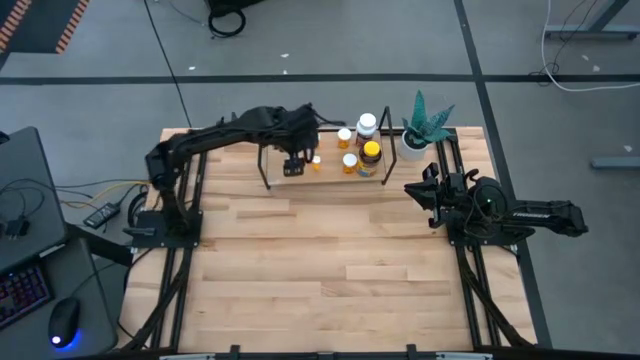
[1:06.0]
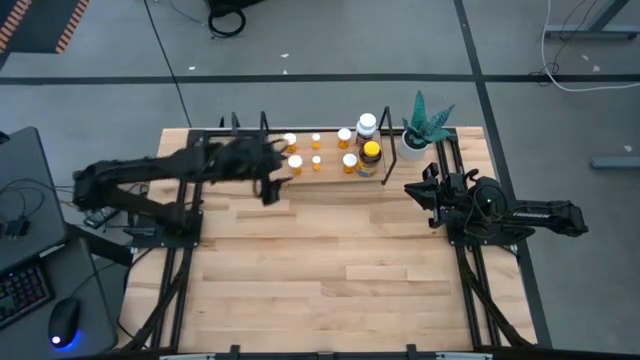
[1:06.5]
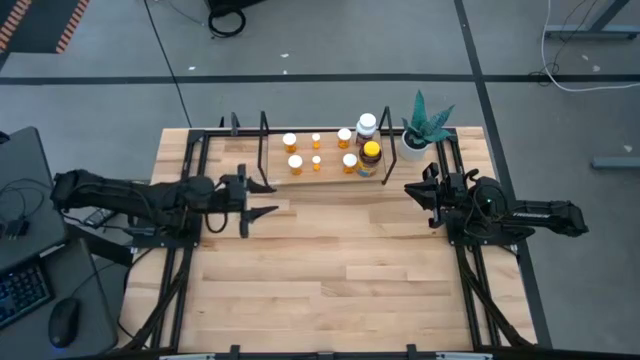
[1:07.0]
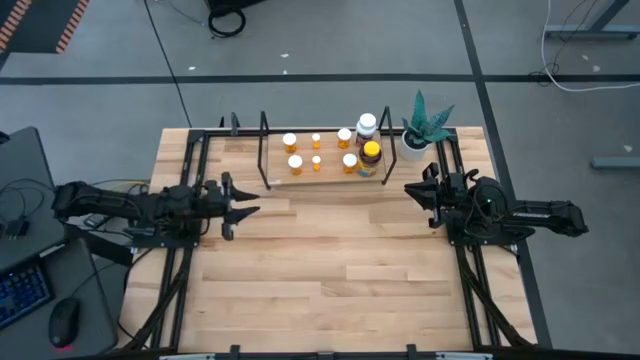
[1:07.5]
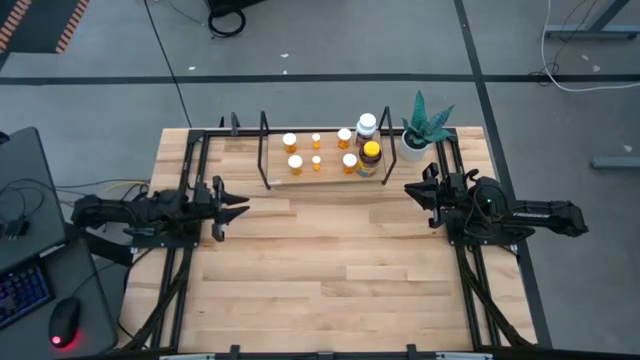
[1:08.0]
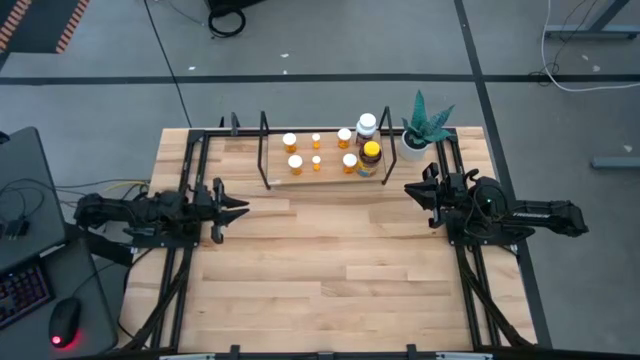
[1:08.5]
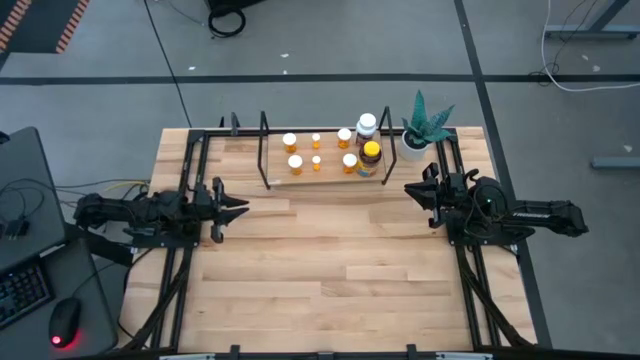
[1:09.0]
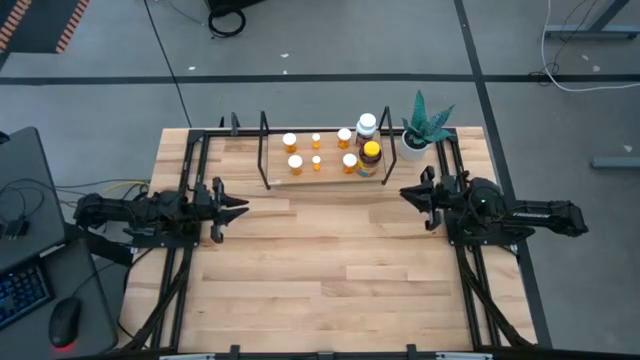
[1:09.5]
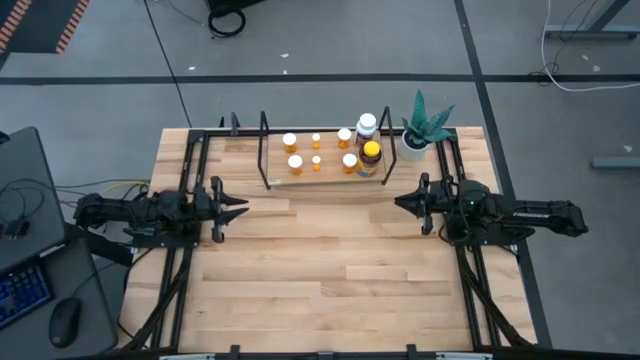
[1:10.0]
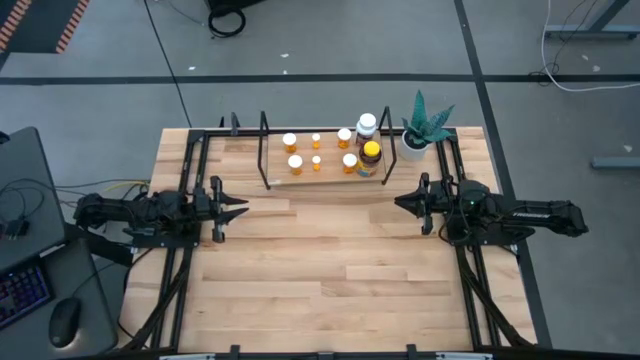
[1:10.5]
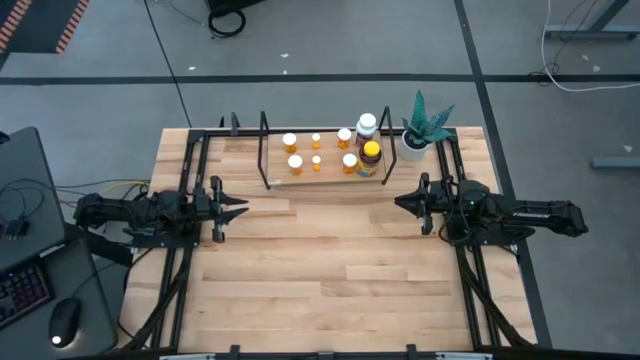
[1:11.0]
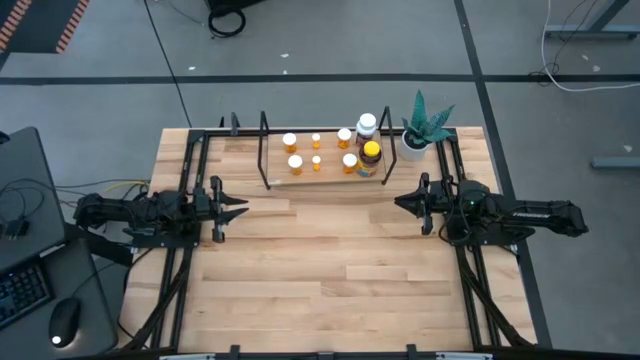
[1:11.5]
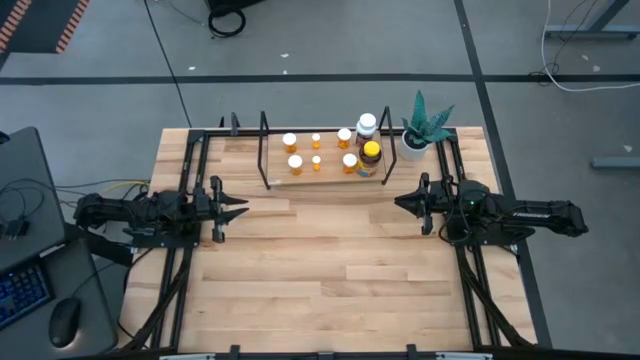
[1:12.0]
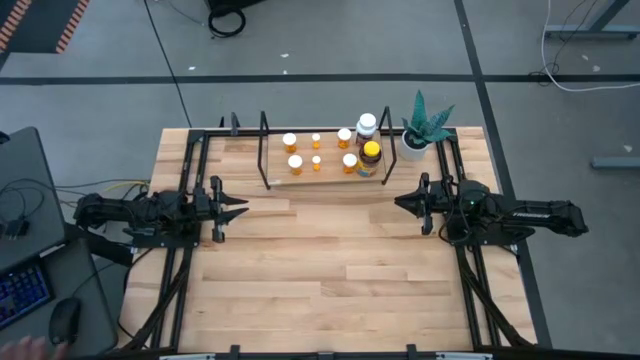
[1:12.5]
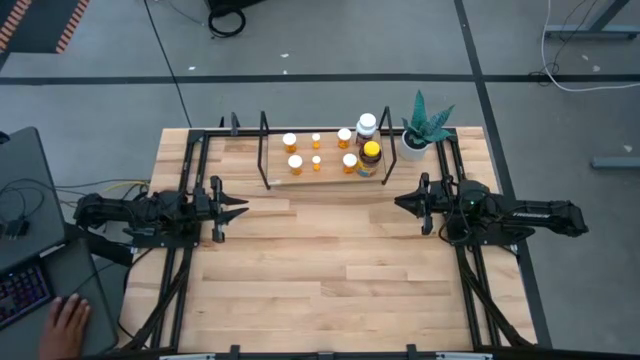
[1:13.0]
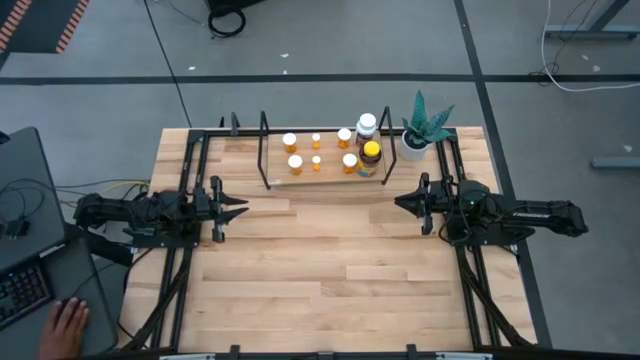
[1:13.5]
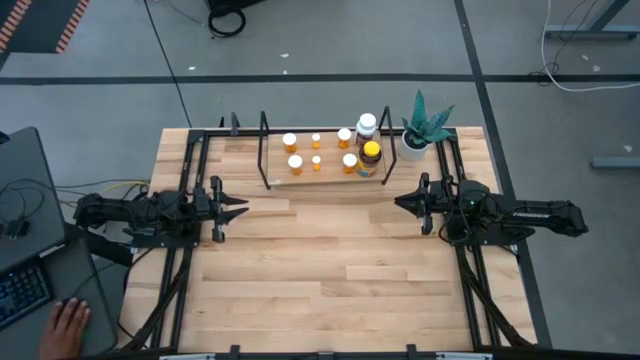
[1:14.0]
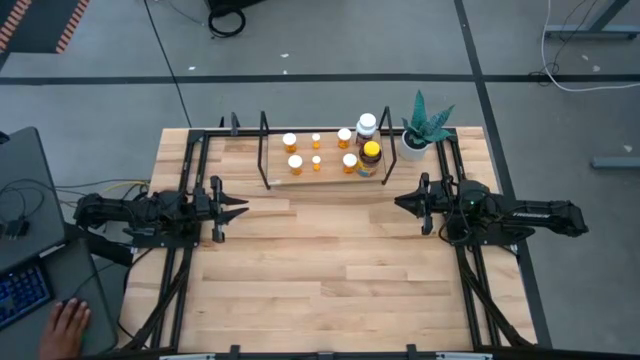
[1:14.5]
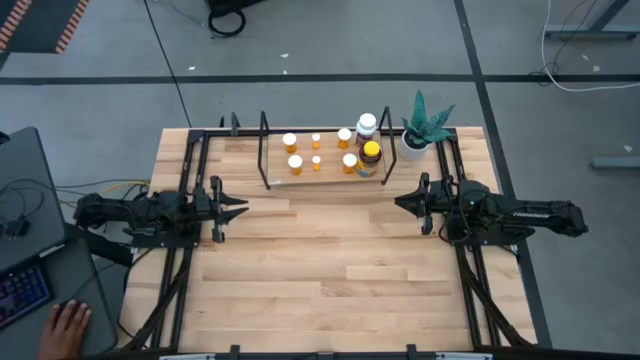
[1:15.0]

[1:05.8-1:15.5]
Task: Pick and place medicine bottles onto shelf by color
Return to Home Position

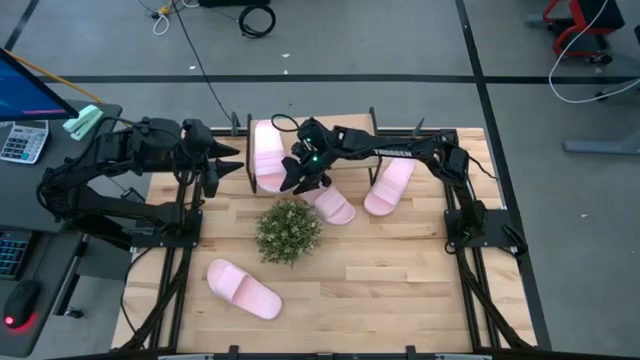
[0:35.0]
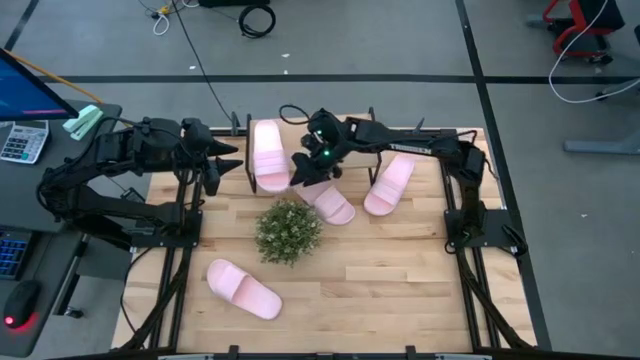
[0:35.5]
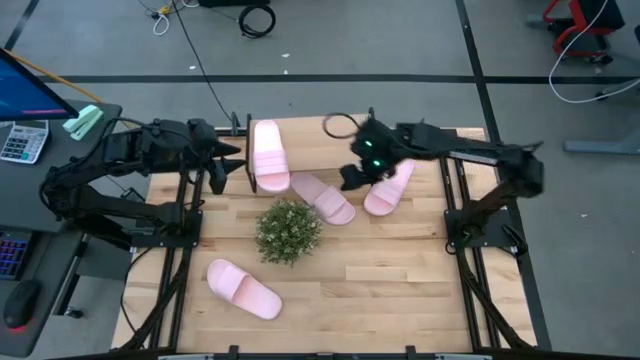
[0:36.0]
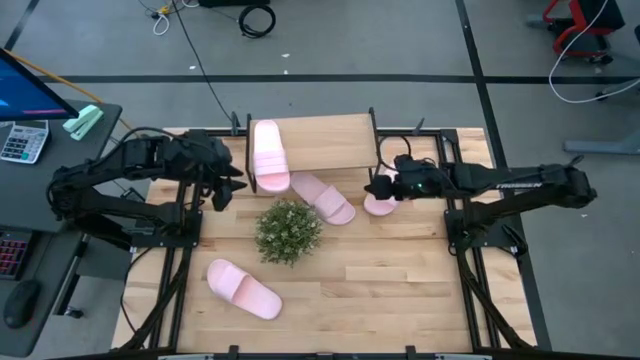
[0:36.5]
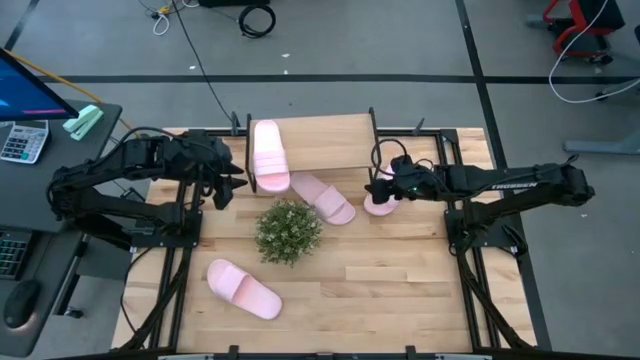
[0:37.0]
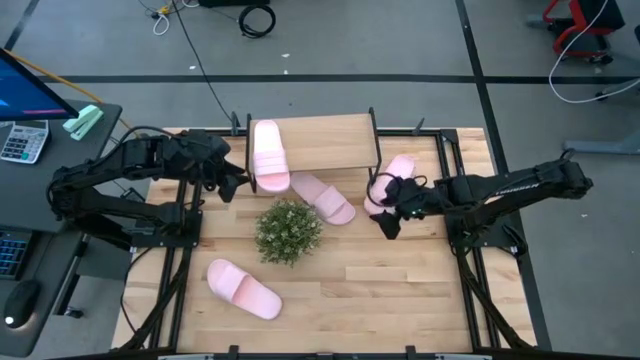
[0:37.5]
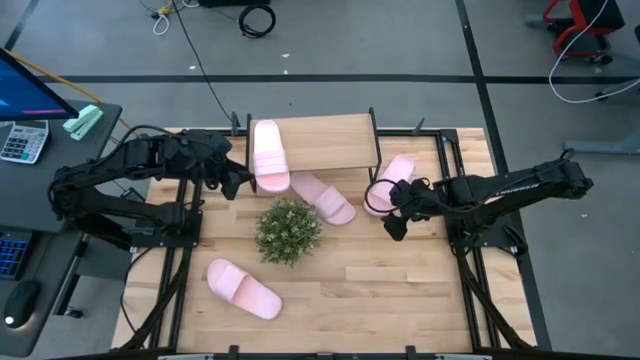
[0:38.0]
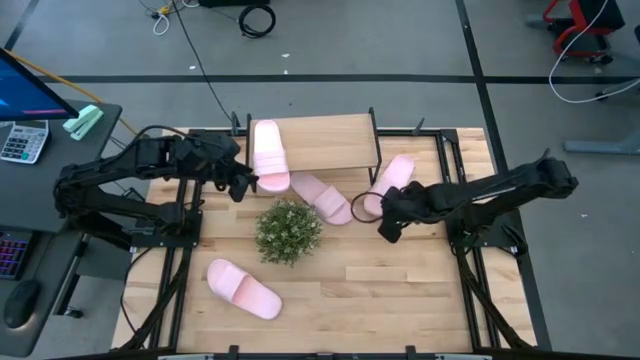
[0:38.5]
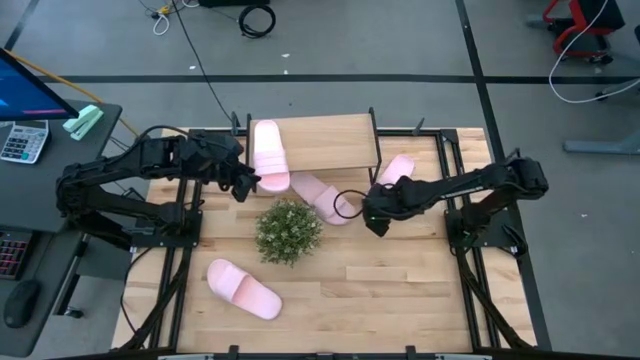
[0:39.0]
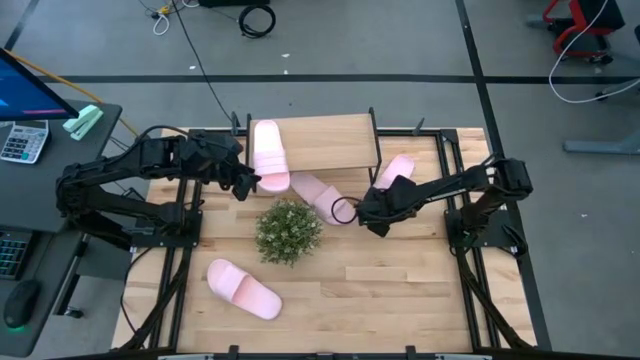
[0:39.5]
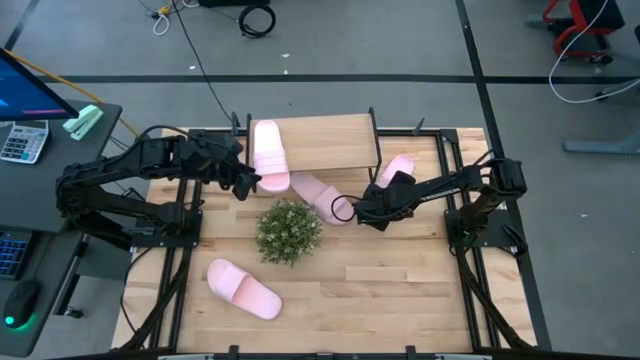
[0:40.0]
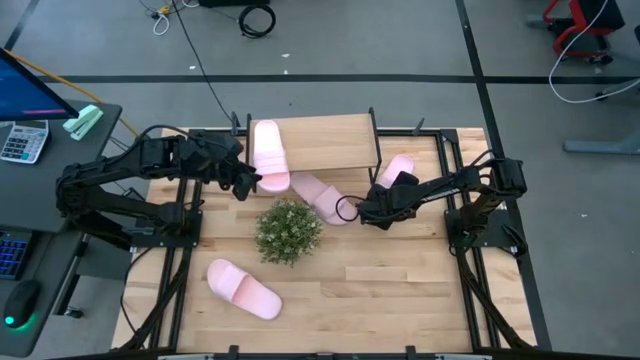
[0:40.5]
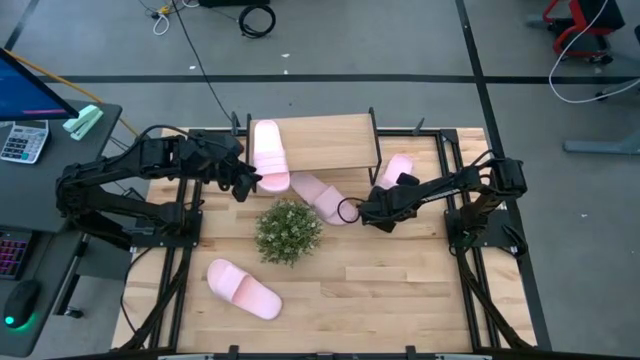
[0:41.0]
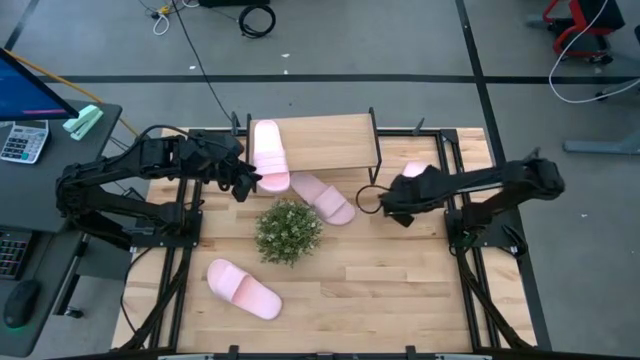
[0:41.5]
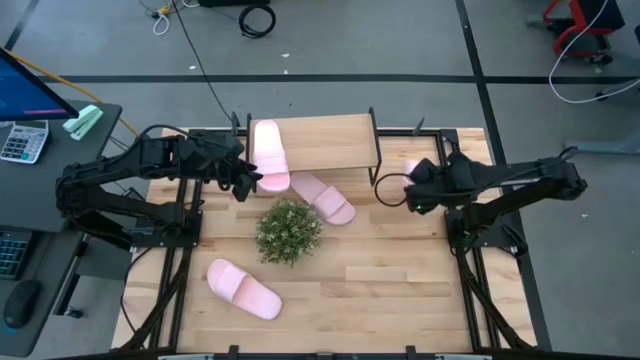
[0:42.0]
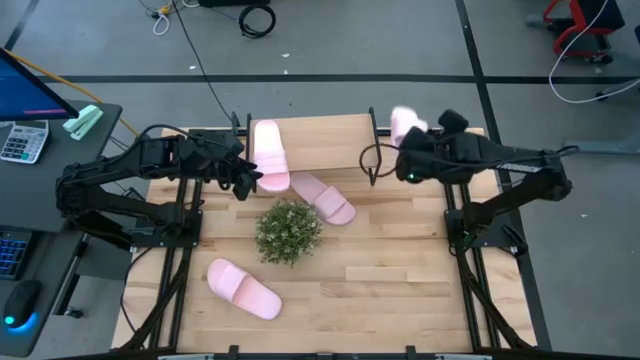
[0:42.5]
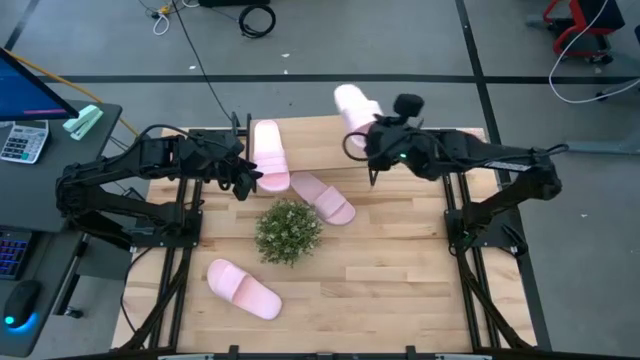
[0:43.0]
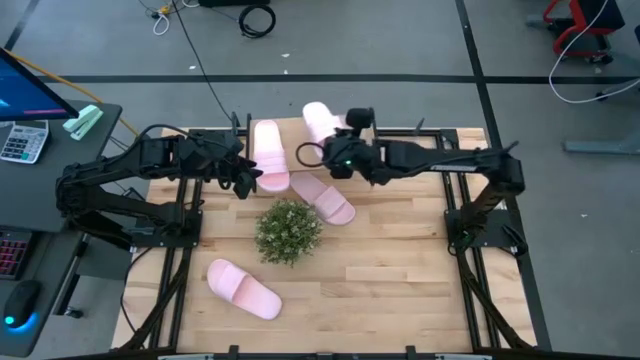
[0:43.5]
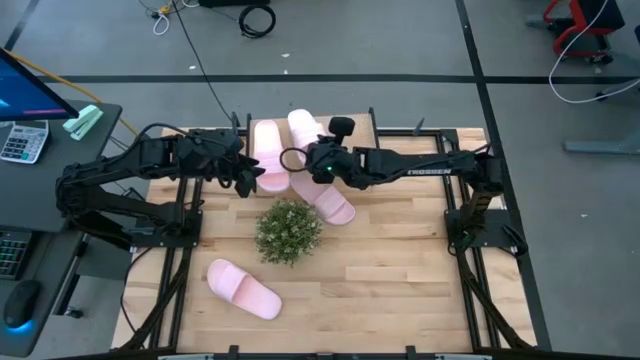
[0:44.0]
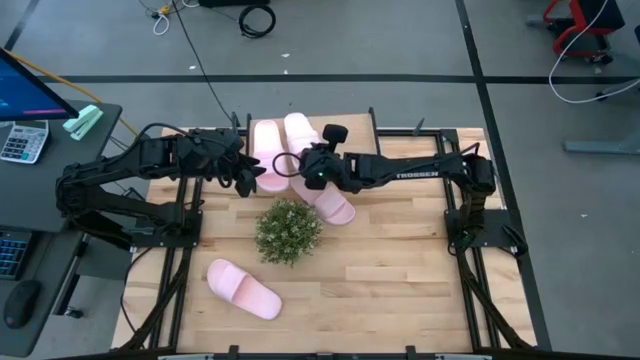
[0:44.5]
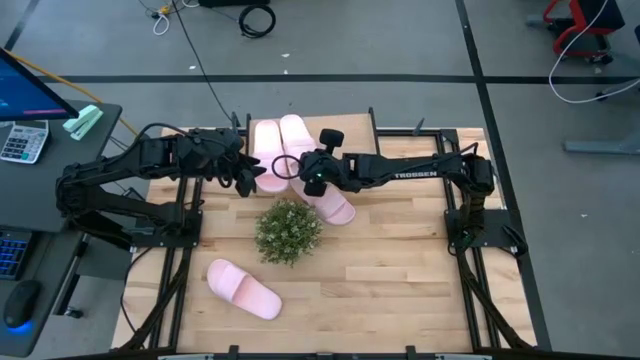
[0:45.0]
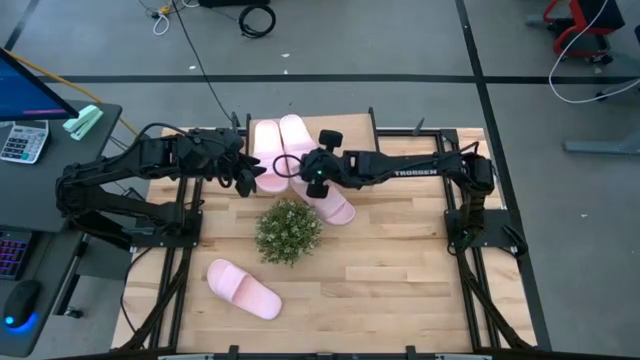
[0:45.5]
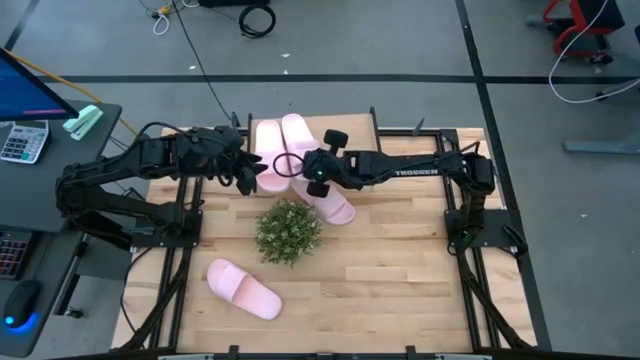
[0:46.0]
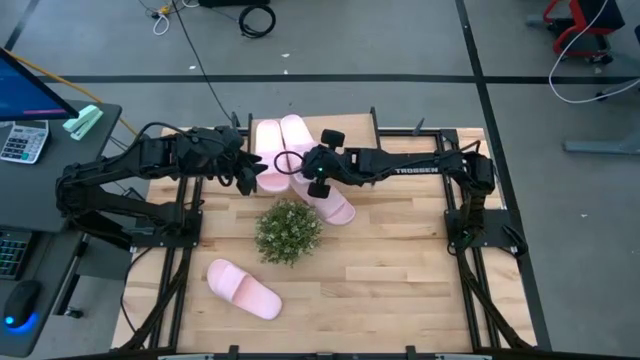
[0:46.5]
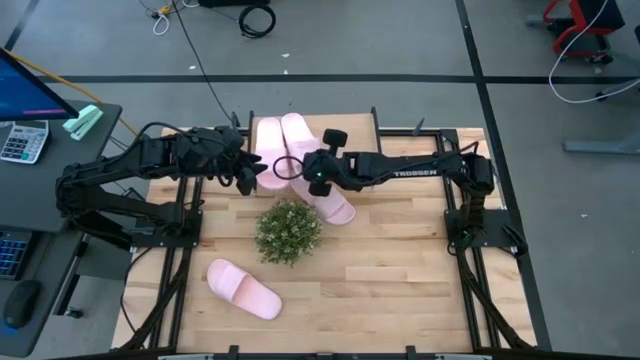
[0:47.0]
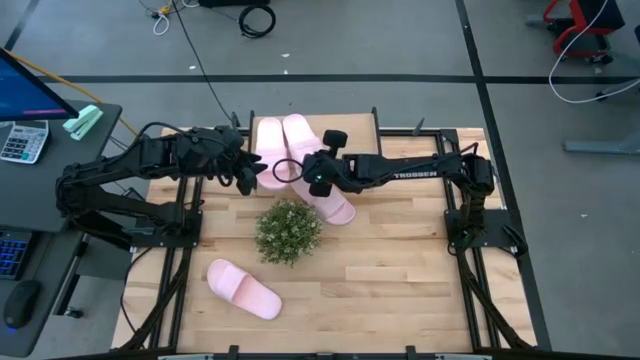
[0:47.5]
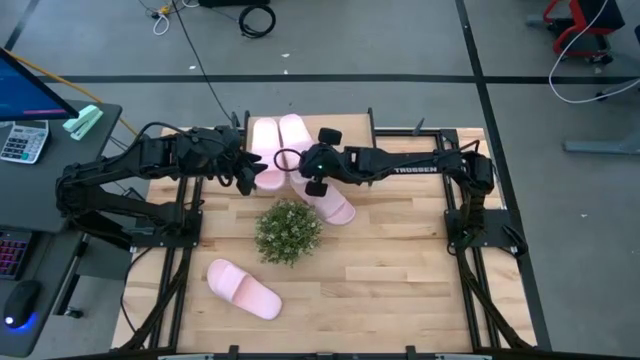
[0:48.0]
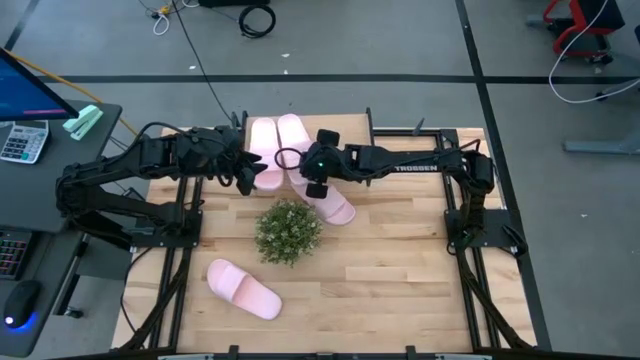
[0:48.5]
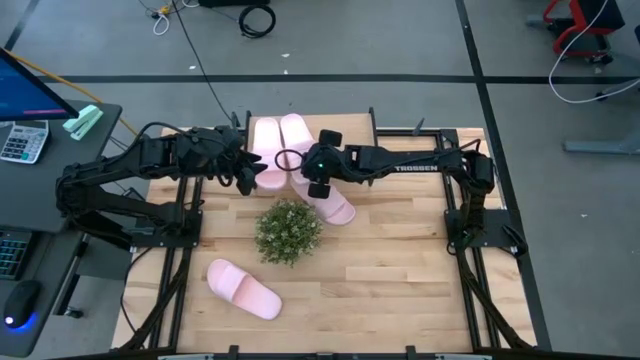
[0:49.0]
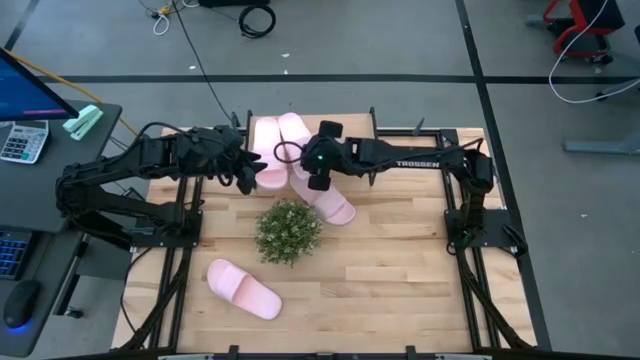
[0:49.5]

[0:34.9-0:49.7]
Task: Pick and place slides into the shelf
Put the pink slide on the shelf
